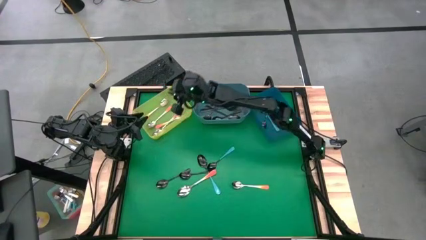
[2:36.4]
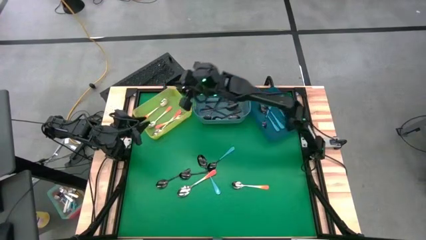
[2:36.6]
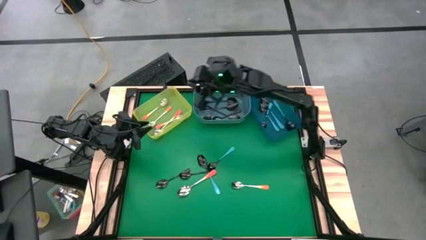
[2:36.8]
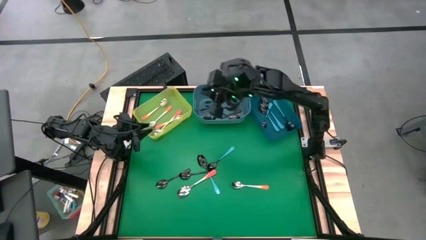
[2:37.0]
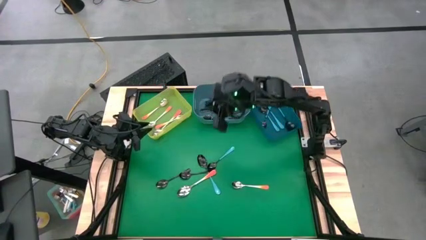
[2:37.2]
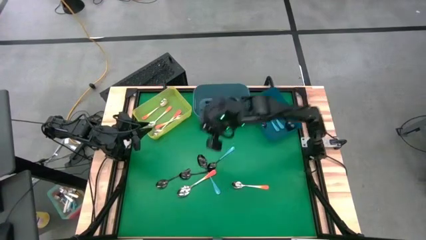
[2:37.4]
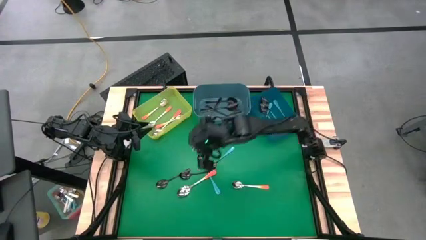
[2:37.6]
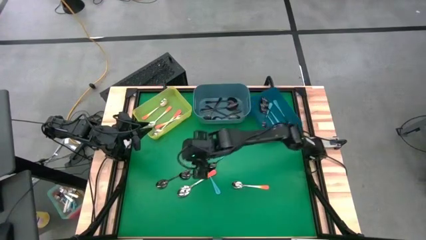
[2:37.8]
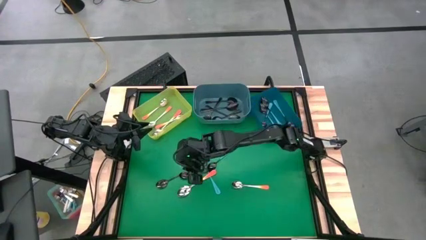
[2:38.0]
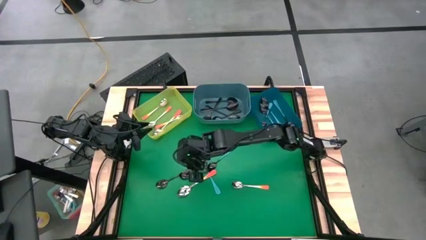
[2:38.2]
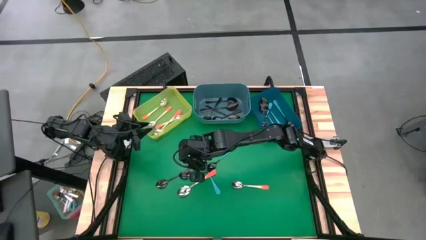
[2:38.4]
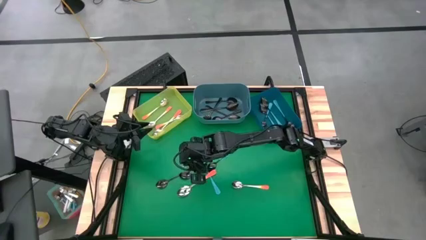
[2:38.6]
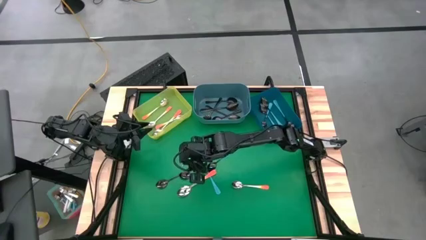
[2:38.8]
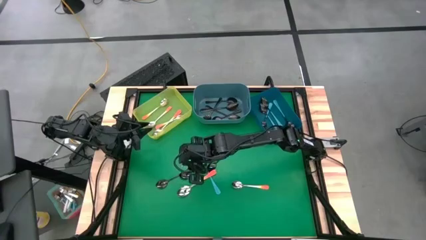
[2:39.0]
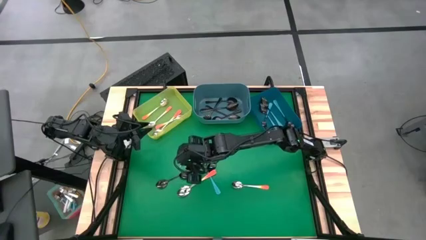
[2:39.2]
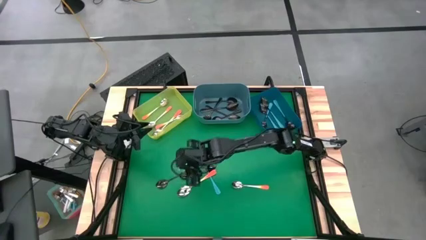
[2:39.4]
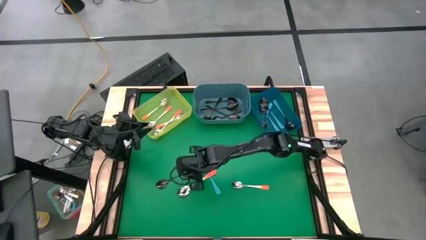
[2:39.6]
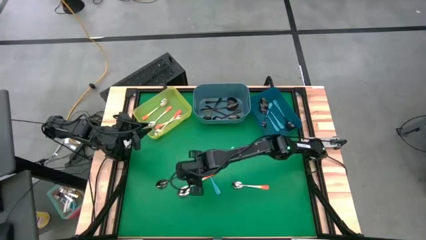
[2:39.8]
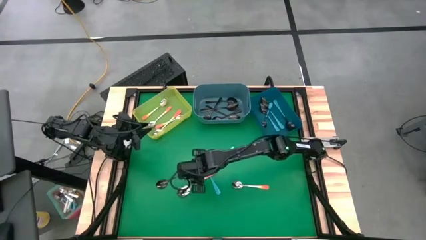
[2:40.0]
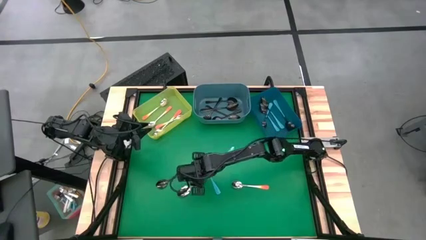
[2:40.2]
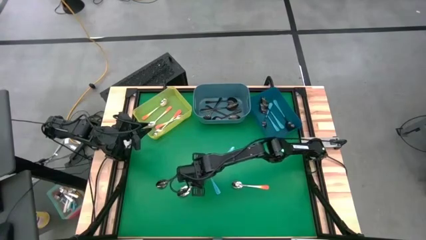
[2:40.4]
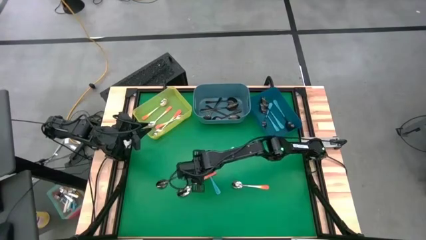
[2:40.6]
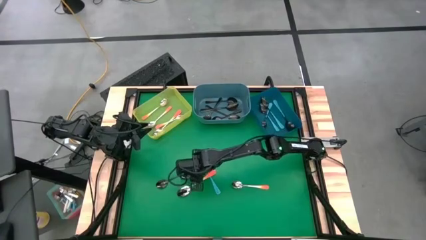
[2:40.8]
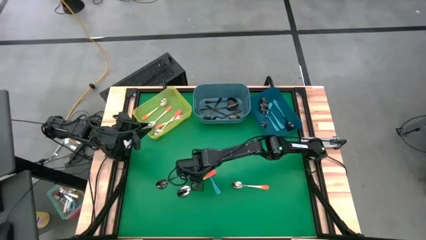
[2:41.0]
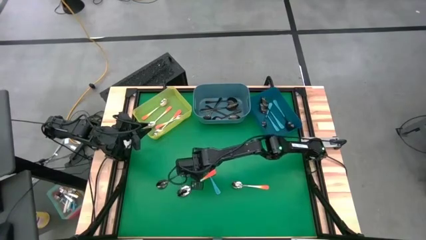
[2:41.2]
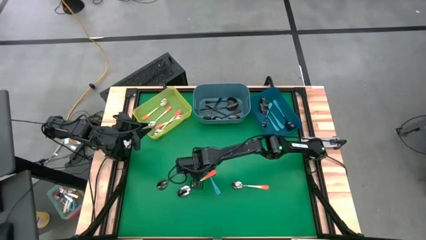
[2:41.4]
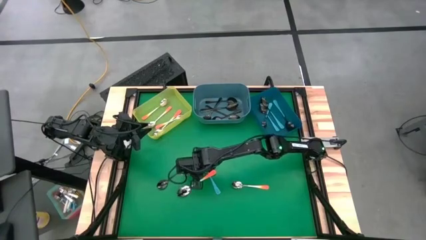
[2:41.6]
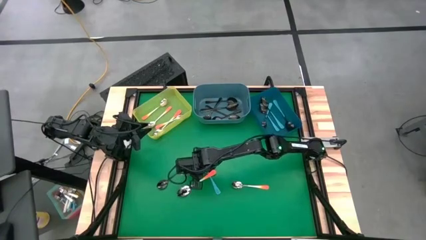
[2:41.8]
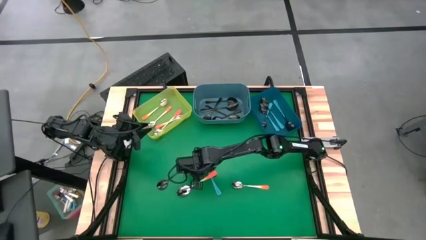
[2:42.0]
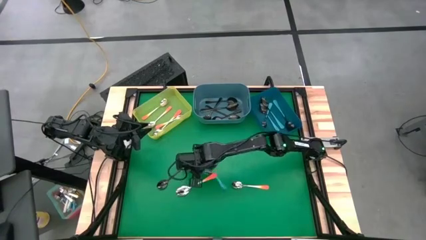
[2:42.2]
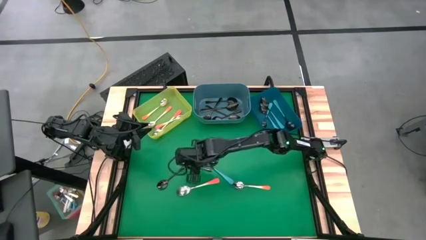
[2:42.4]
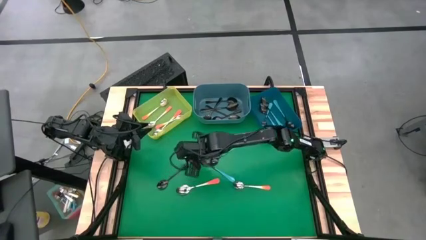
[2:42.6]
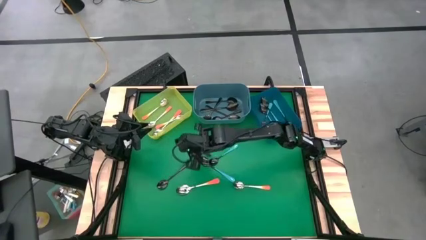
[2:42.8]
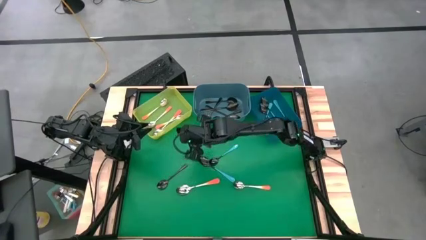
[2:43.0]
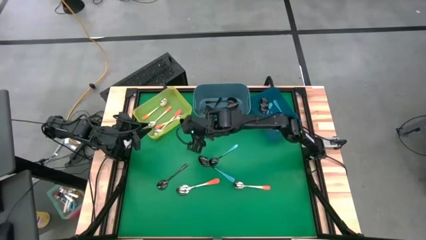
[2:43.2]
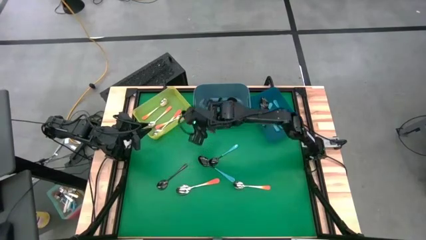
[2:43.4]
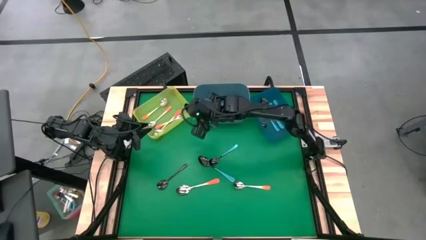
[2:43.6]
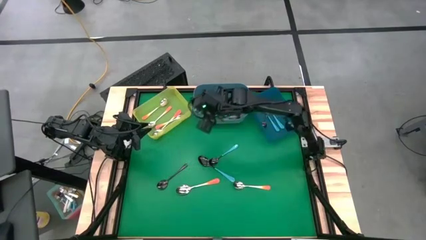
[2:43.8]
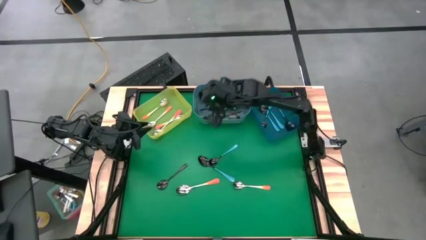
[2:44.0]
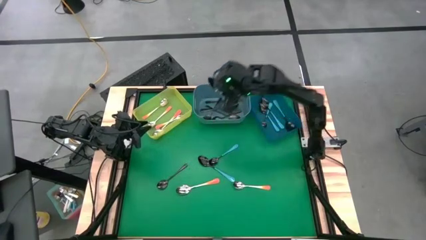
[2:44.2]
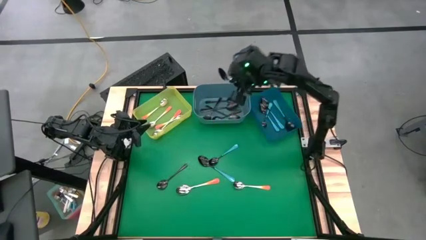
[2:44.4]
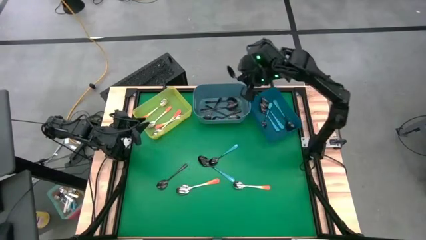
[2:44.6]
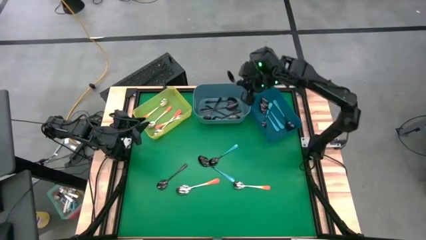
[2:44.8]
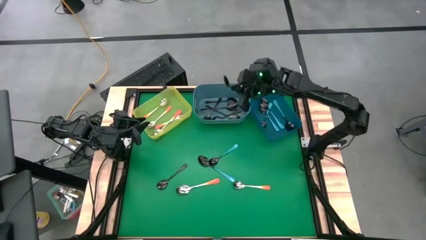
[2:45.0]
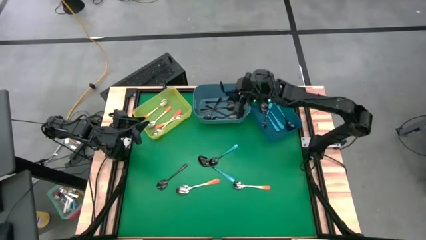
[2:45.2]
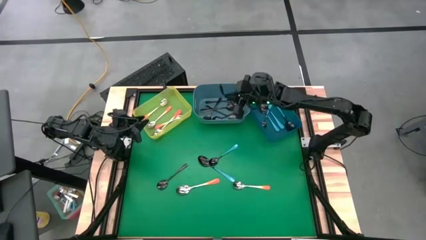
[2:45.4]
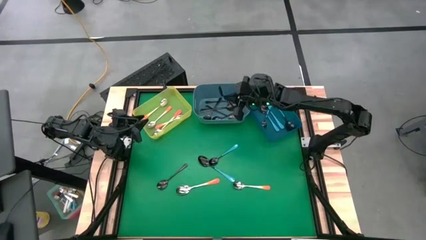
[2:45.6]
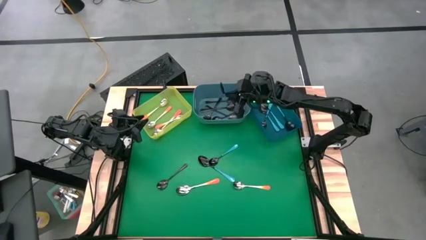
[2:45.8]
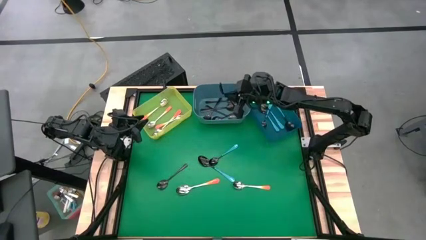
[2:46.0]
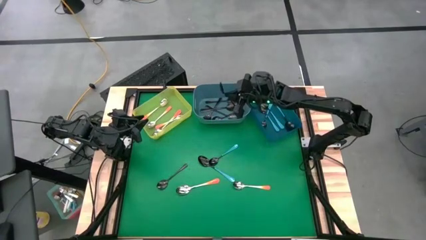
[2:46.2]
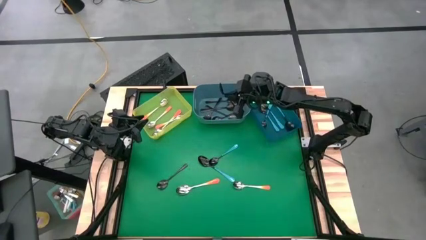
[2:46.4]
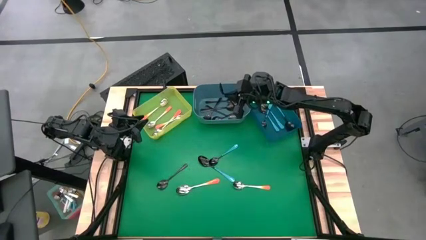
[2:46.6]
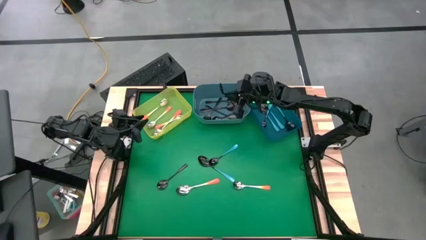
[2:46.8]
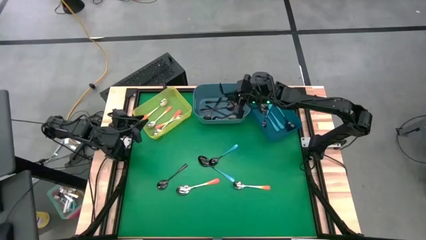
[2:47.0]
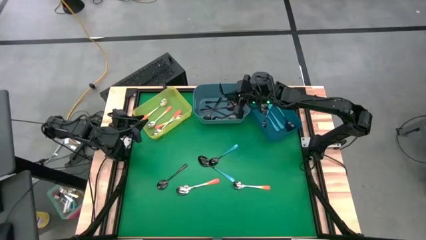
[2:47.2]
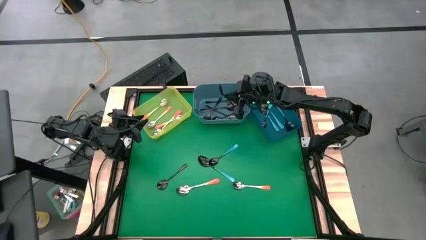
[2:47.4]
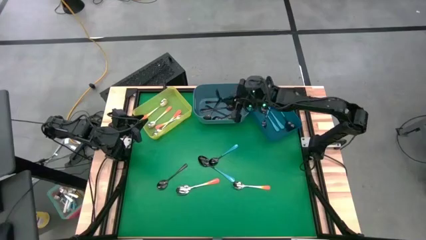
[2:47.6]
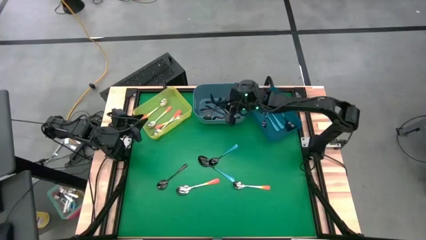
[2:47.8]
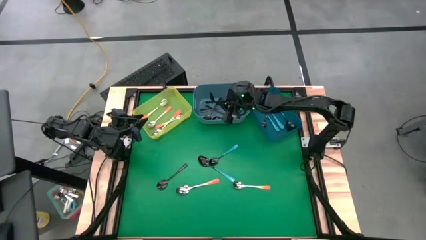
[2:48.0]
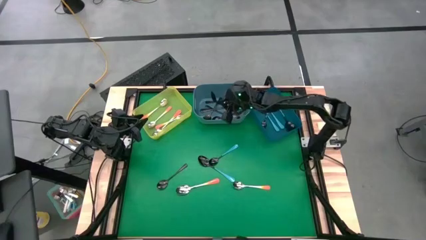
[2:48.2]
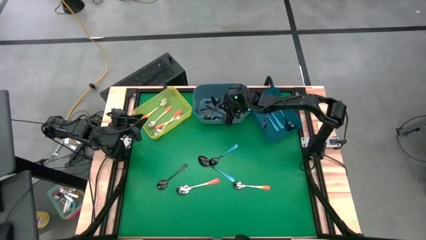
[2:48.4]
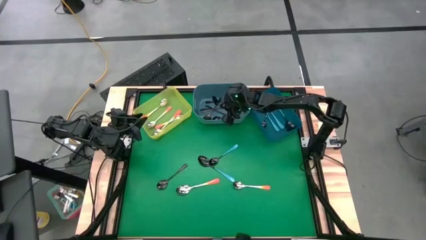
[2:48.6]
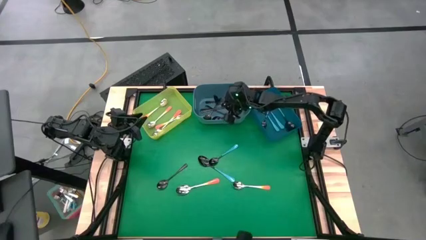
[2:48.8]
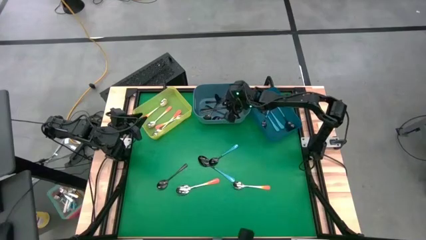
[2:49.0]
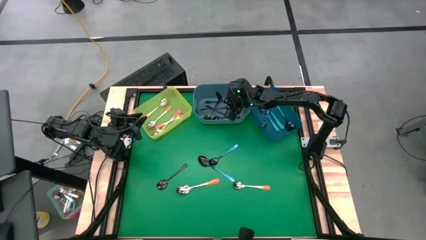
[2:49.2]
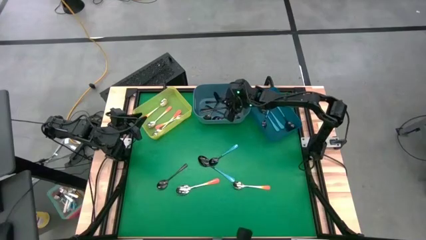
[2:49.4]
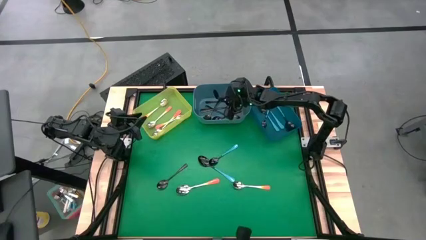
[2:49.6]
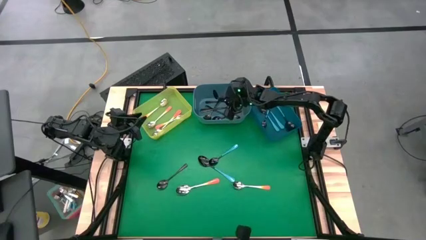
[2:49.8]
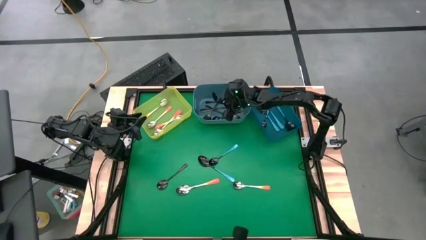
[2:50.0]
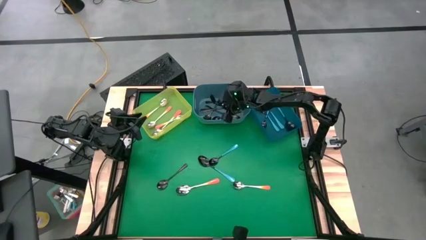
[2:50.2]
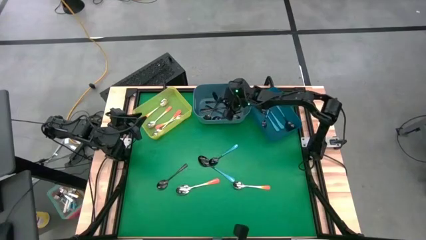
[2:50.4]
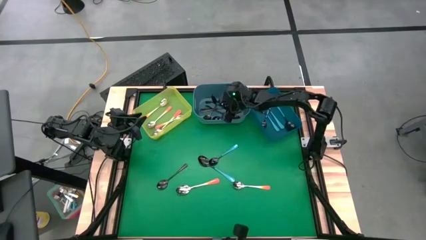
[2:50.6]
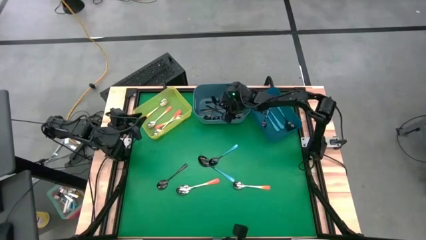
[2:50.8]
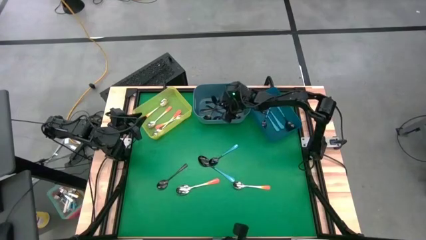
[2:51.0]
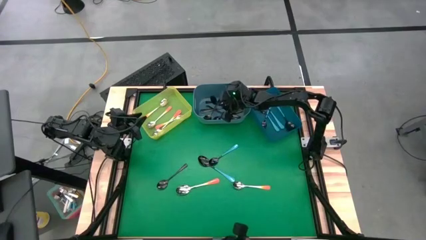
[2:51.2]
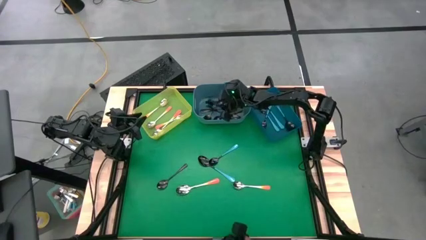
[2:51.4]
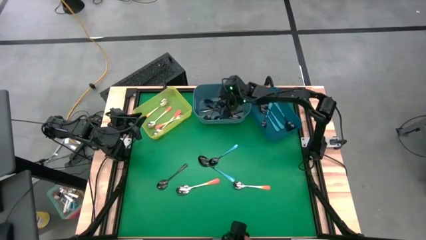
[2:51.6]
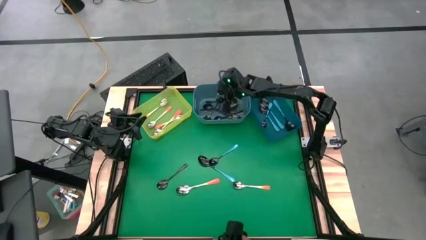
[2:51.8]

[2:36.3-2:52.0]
Task: Sort silverware by color (type)
Put the black spoon into the light blue bin

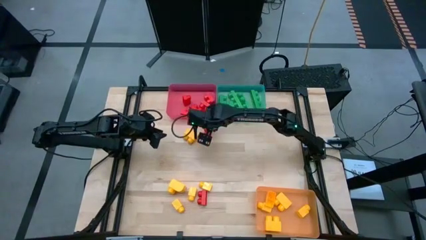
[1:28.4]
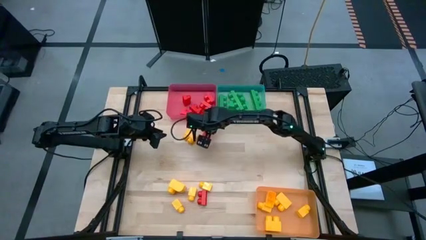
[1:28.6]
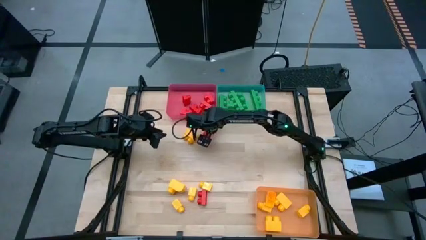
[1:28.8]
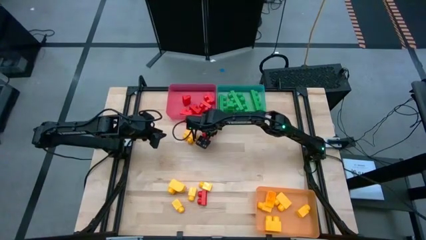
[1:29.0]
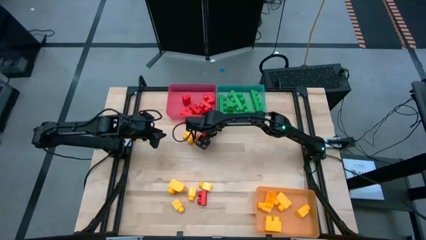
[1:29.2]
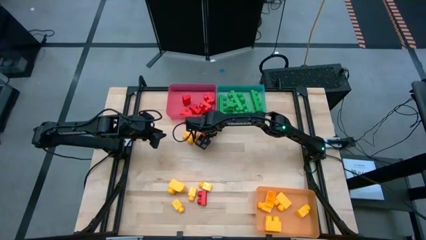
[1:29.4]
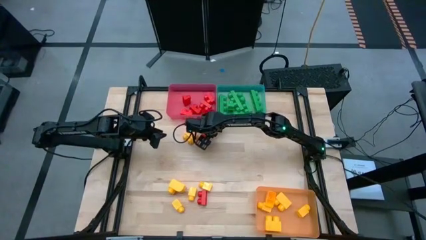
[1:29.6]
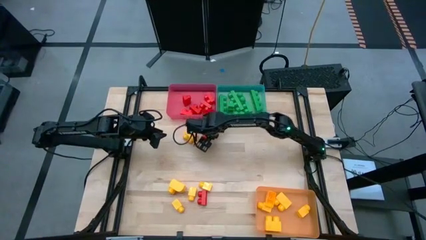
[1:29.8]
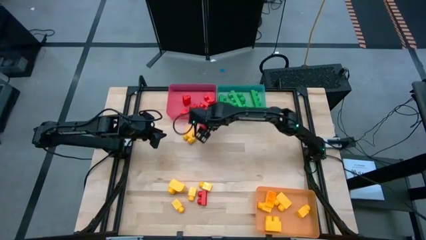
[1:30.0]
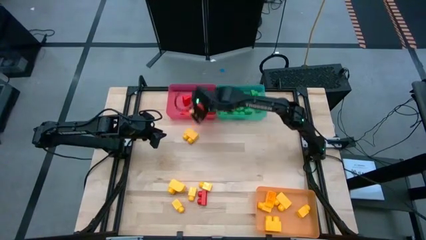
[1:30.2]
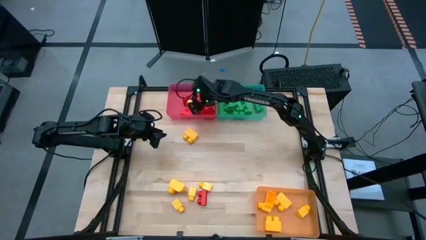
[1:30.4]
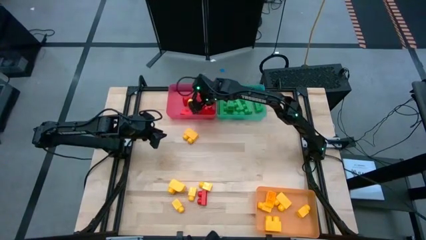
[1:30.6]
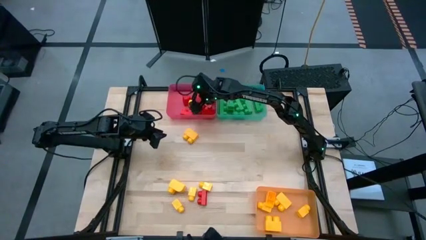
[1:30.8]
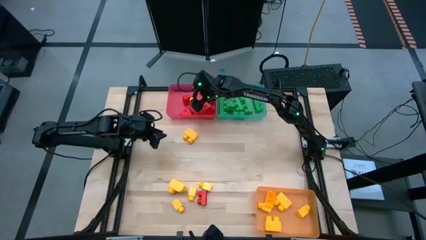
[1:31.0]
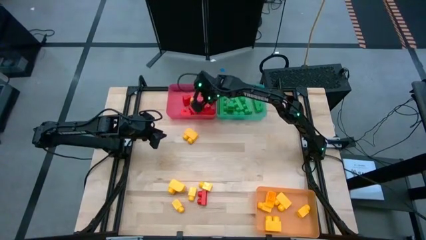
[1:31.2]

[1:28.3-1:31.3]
Task: Sort blocks
Put the red game piece into the red bin
